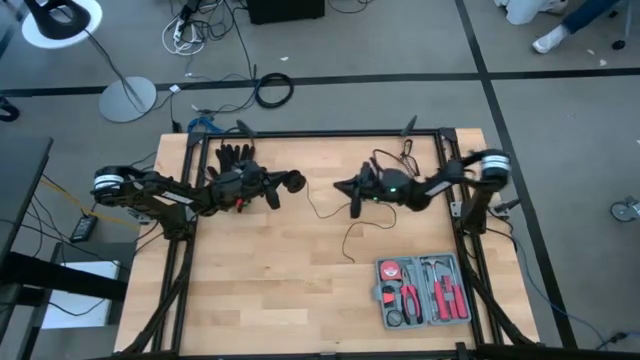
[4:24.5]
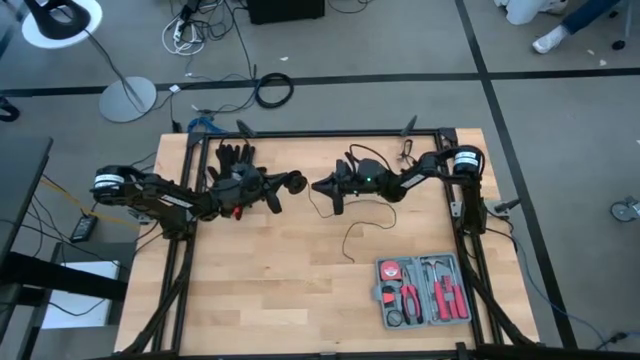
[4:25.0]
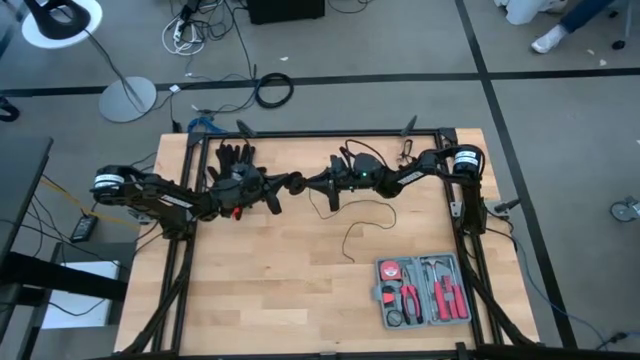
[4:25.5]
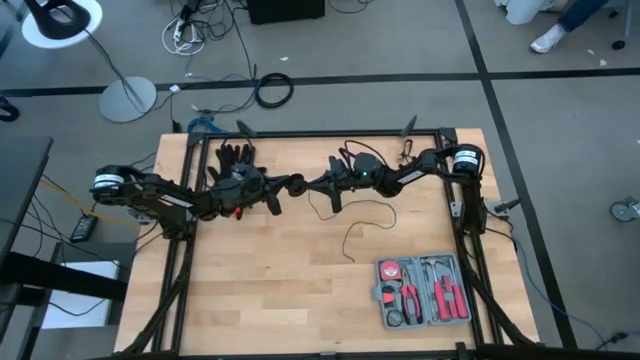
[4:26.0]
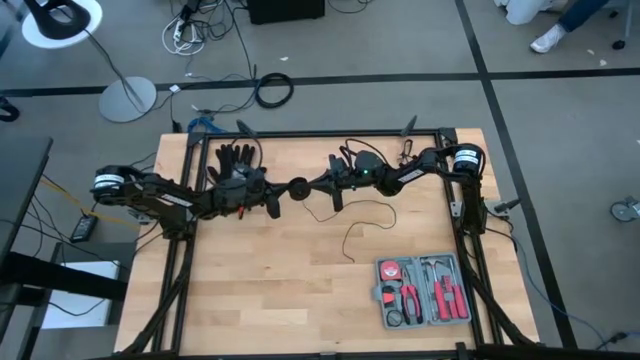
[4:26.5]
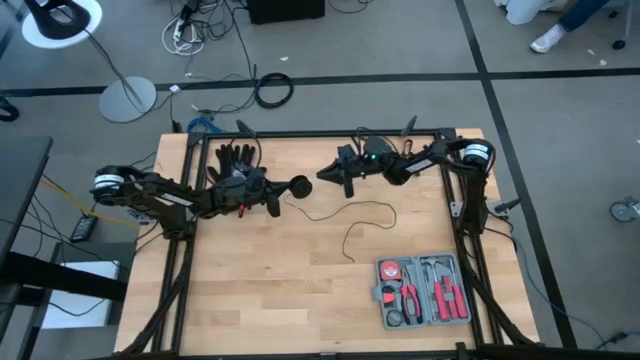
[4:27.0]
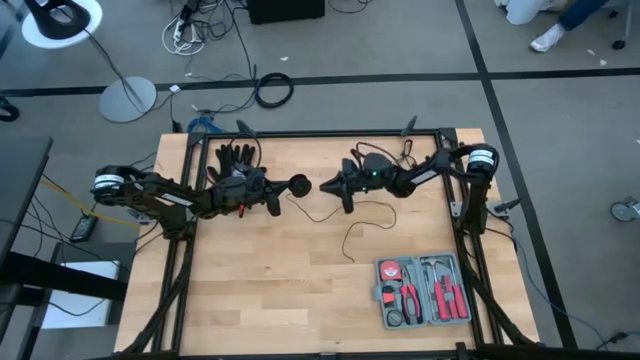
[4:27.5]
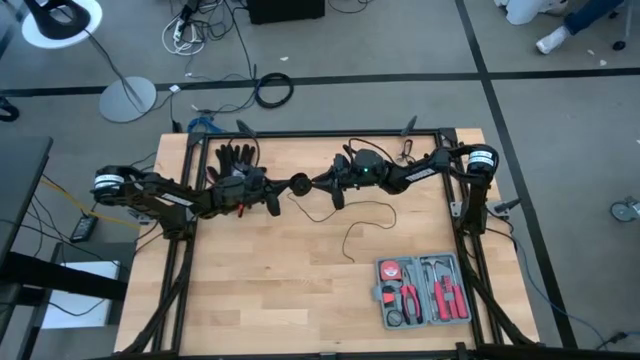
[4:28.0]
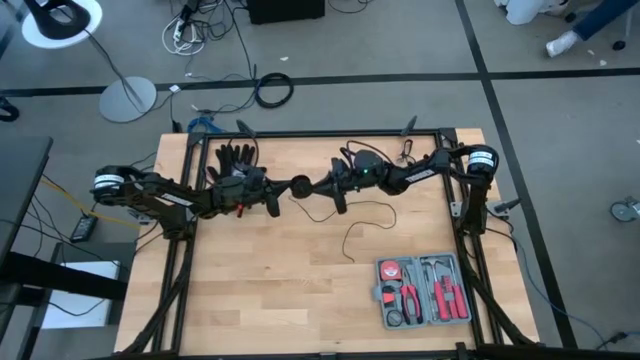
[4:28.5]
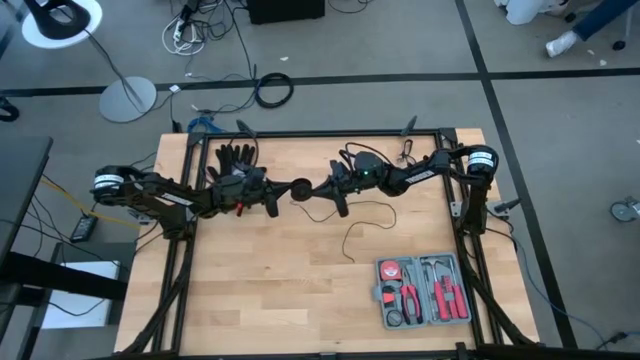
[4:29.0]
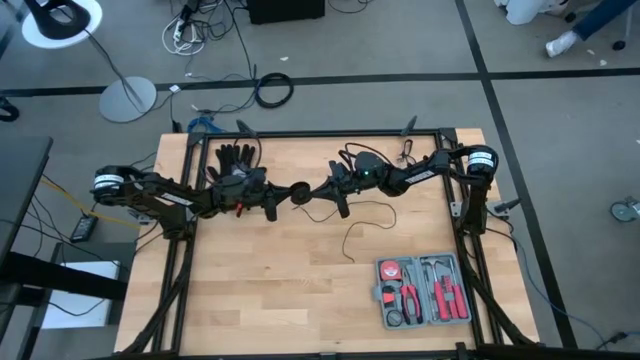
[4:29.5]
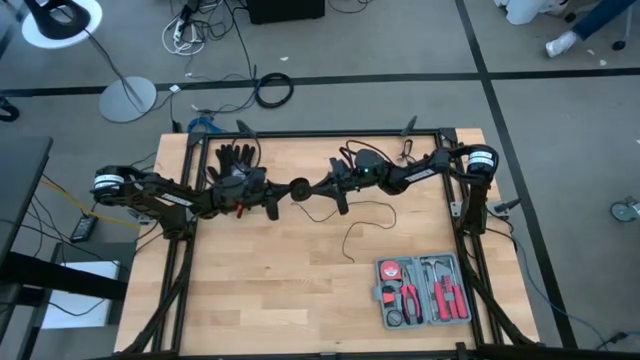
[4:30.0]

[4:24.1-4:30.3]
Task: Coil cords
Coil the black wire

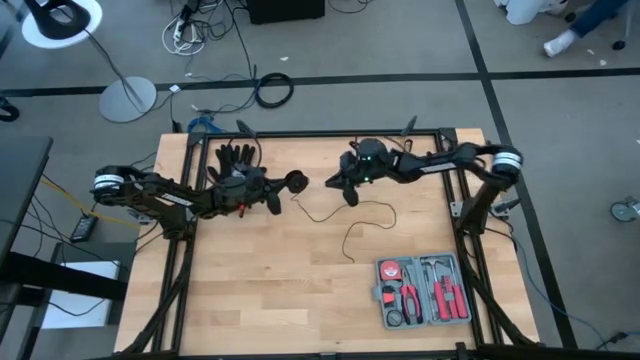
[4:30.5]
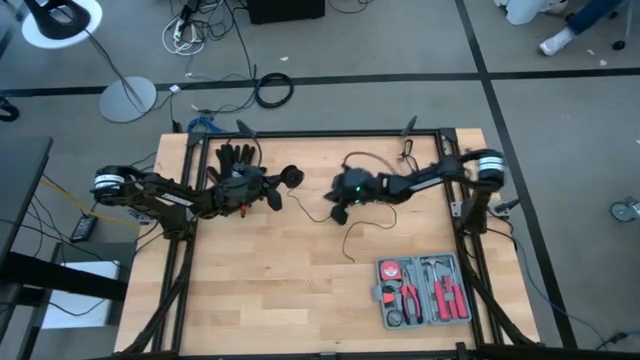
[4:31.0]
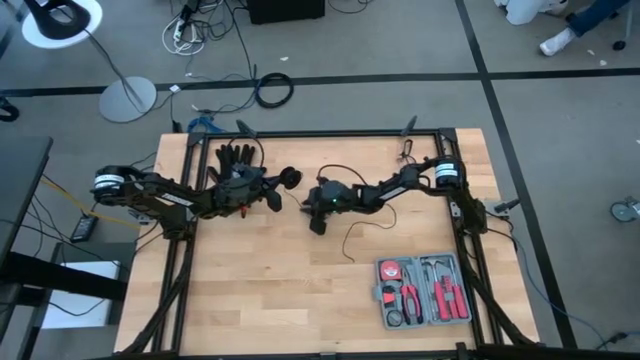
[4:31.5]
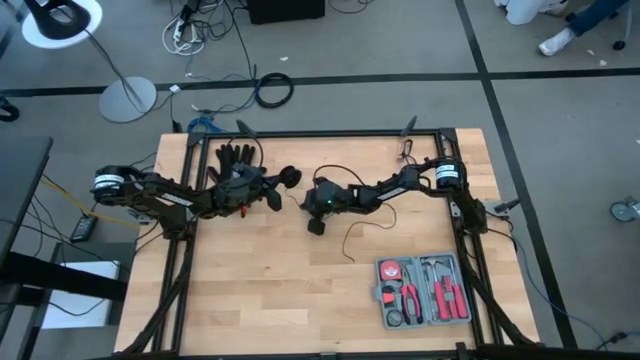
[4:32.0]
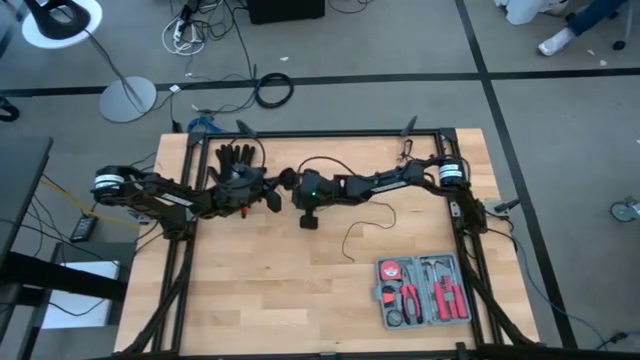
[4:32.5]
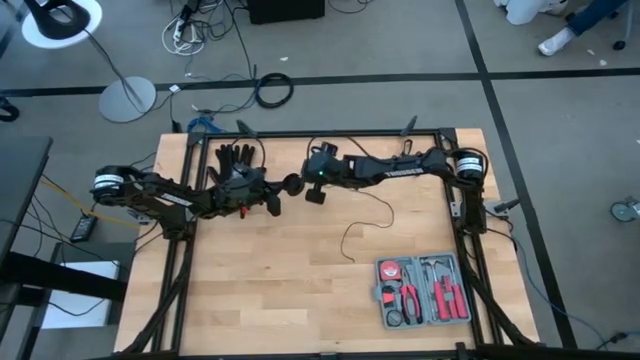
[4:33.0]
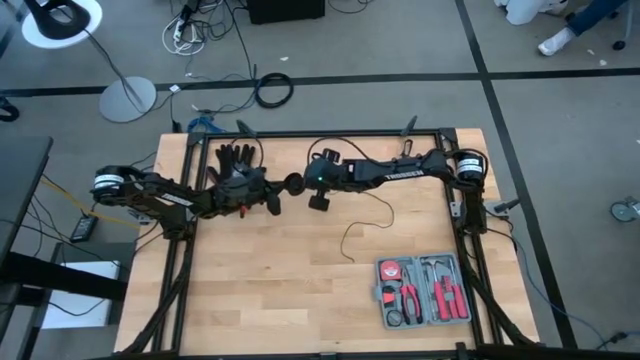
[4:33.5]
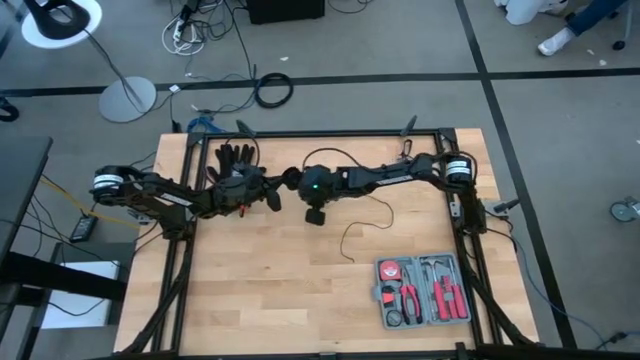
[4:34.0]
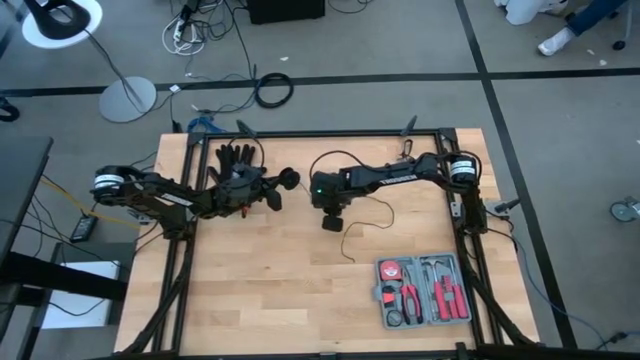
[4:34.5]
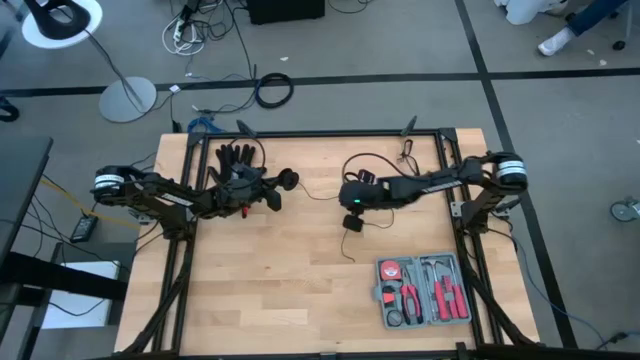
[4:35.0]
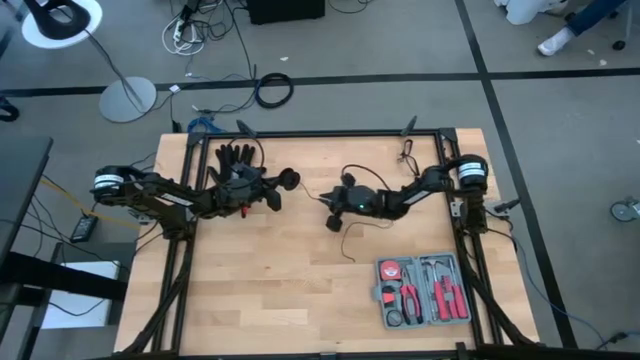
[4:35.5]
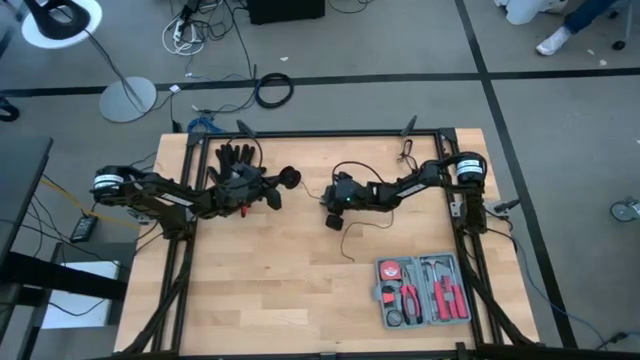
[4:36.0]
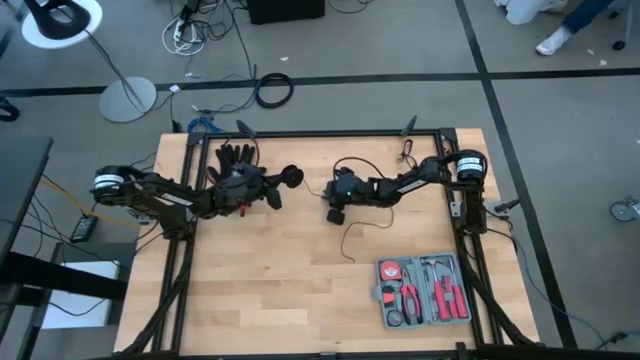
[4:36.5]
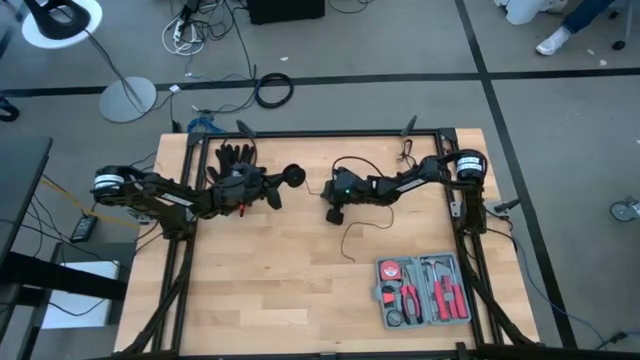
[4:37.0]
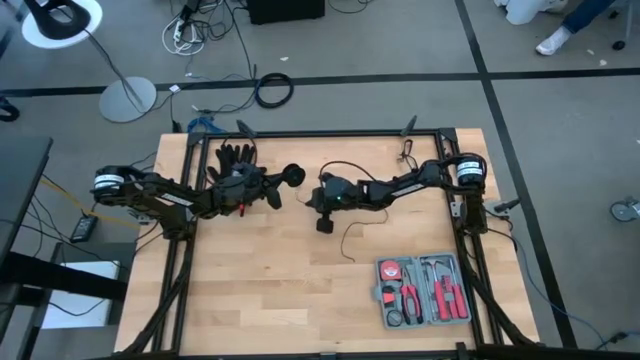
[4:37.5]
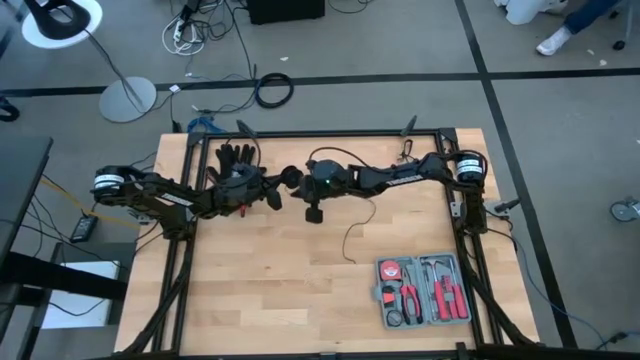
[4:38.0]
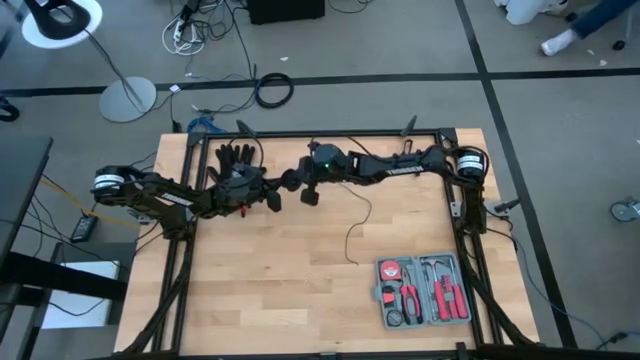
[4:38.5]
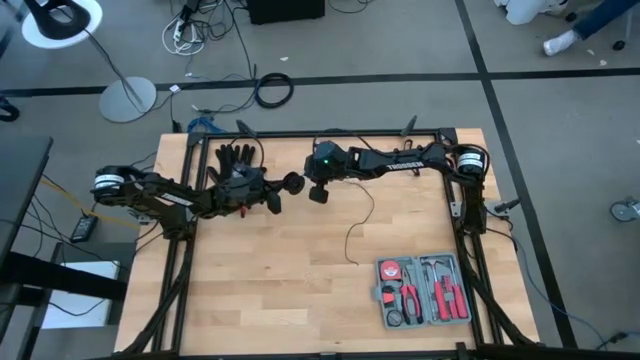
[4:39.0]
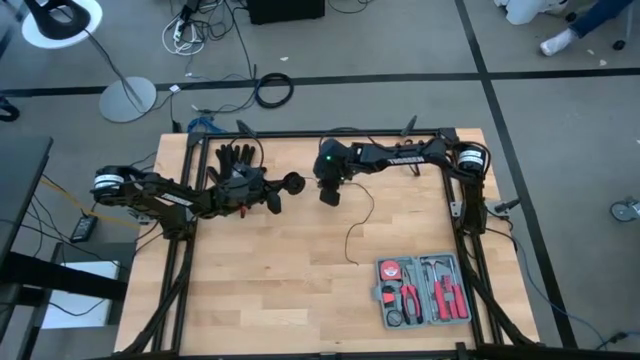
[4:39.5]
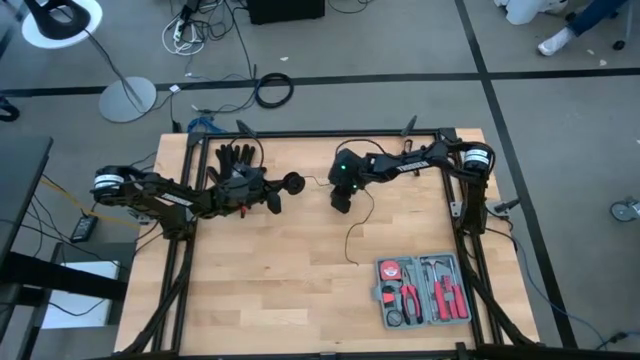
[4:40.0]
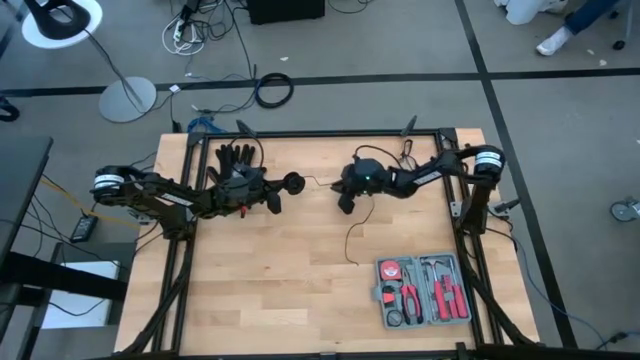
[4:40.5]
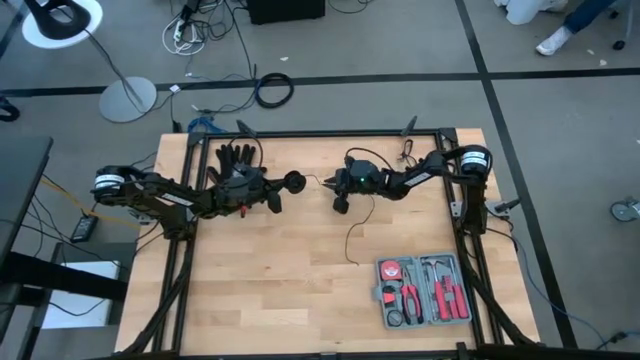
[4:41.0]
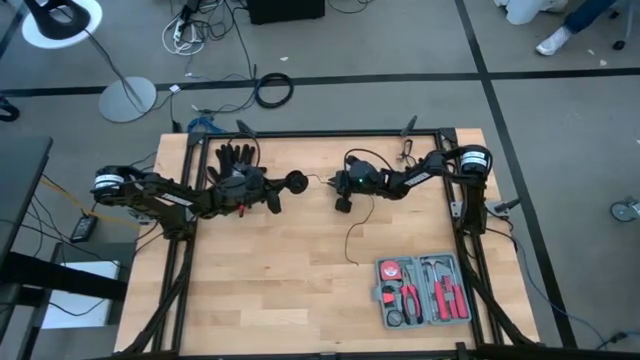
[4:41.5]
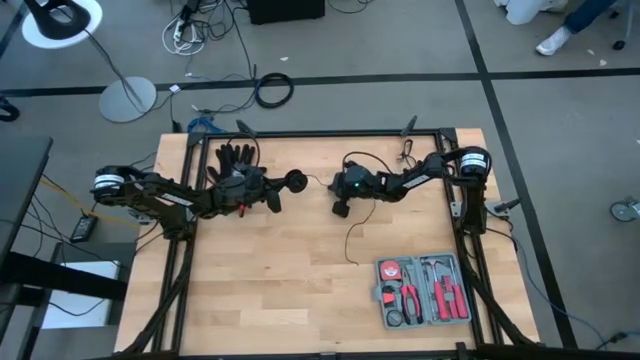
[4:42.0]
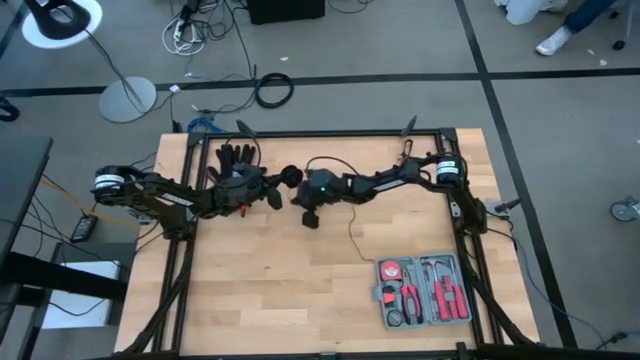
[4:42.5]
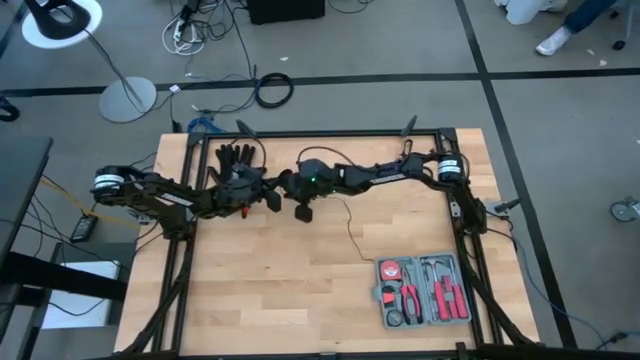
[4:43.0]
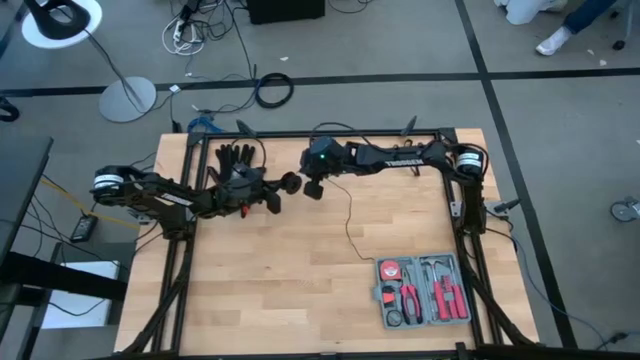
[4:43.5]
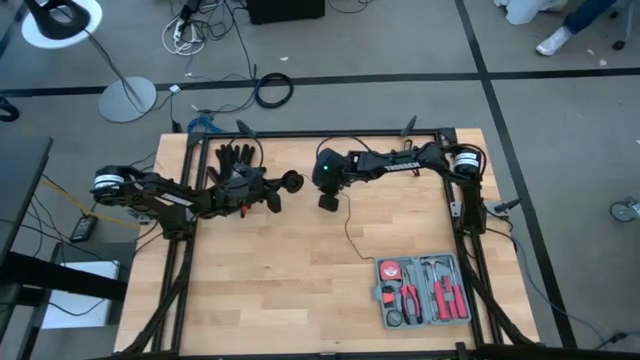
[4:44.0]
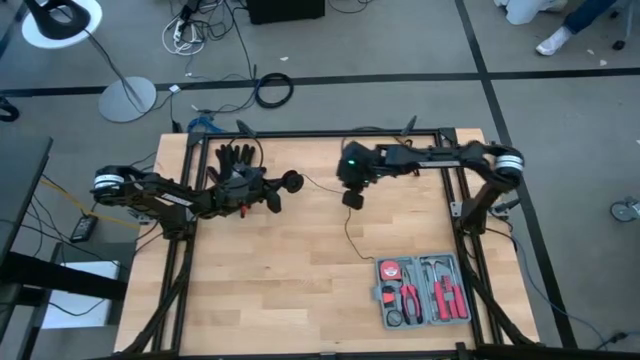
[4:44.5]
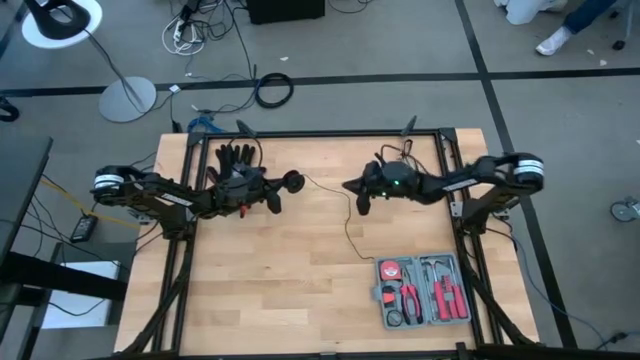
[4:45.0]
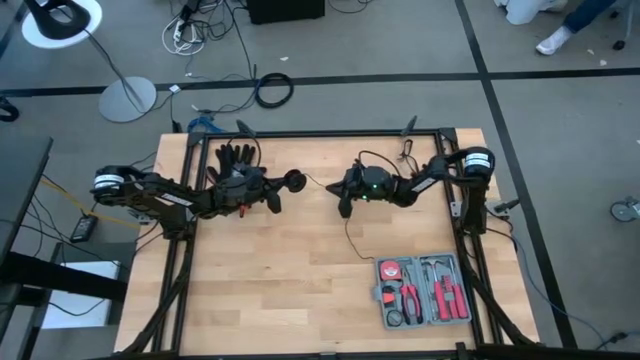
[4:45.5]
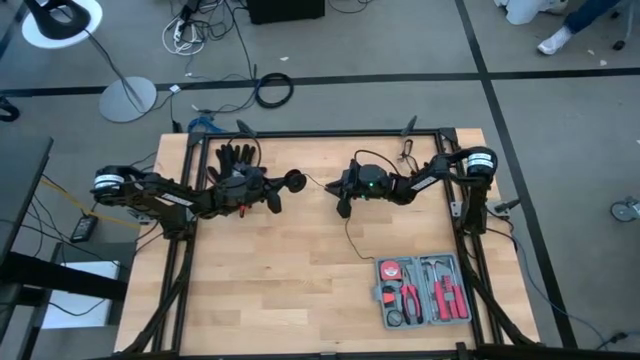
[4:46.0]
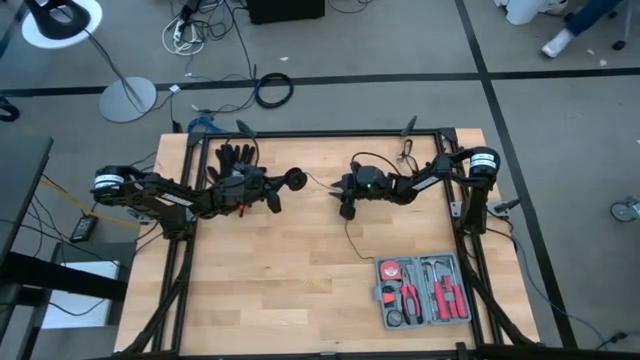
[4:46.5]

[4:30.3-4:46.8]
Coil the black wire
